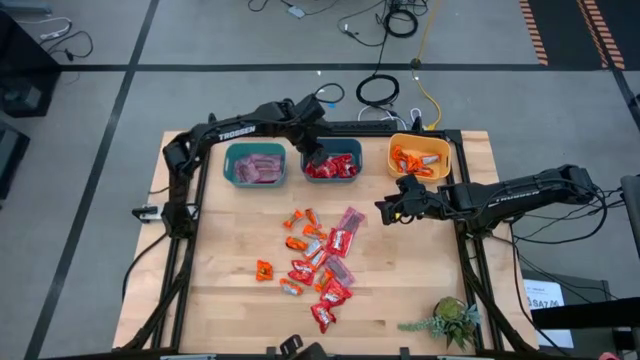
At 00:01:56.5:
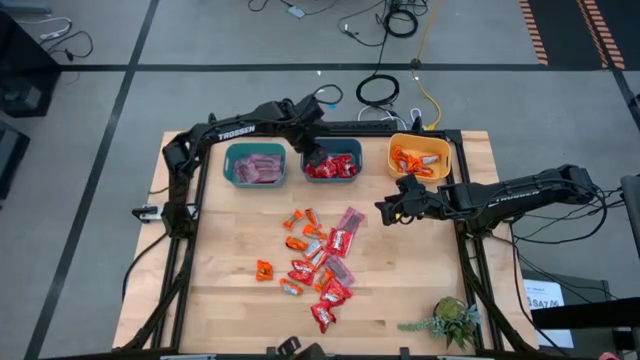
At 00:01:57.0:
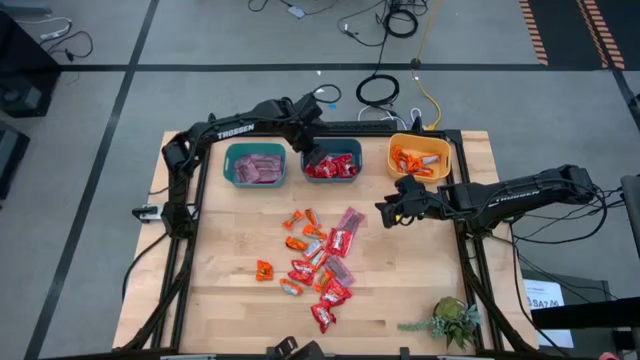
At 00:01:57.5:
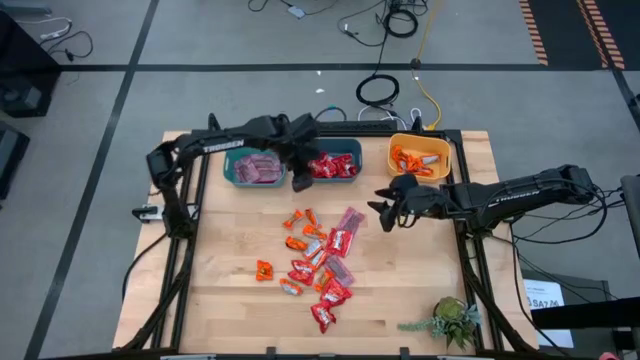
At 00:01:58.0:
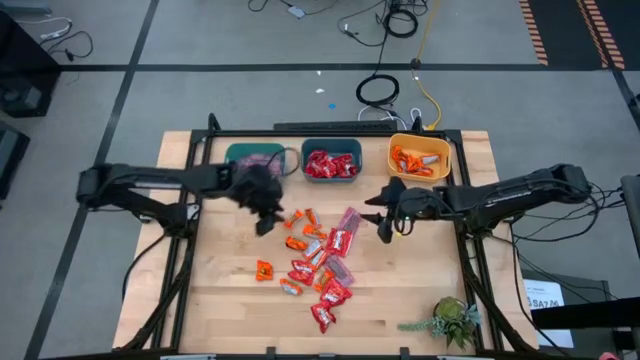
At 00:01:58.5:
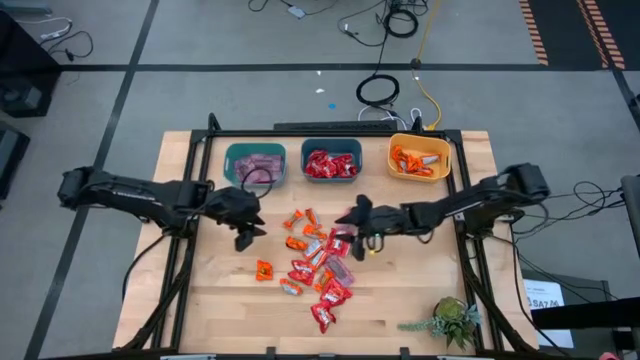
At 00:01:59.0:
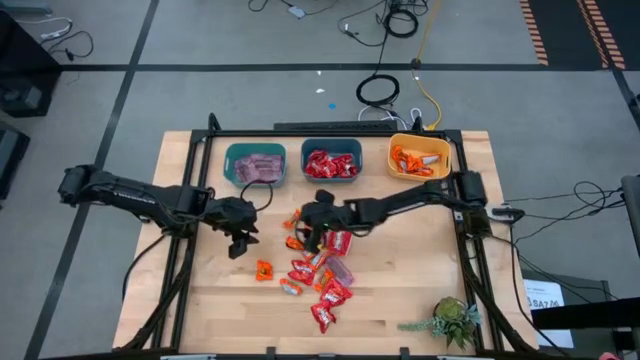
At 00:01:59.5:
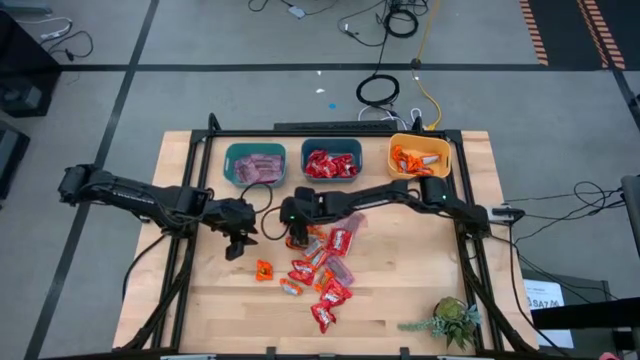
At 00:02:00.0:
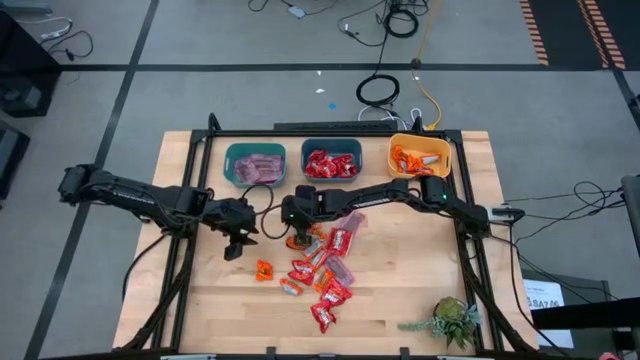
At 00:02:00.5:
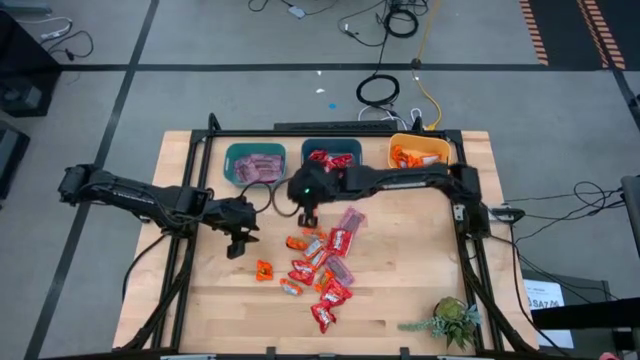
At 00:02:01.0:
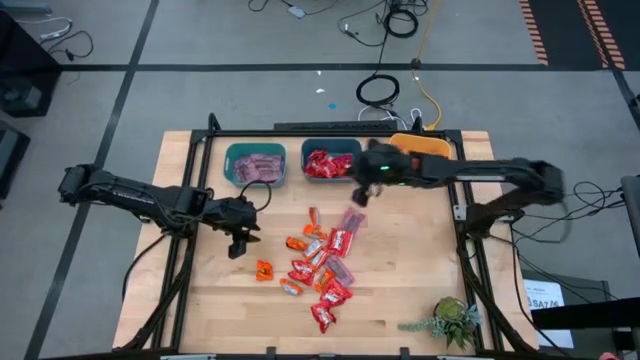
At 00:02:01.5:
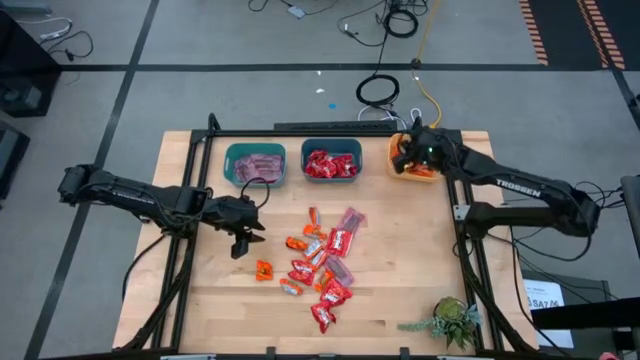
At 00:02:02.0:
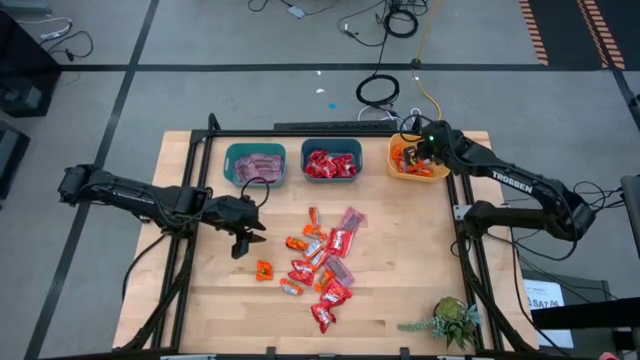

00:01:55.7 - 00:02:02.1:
Task: Sort candy
Put the orange chocolate into the yellow bin

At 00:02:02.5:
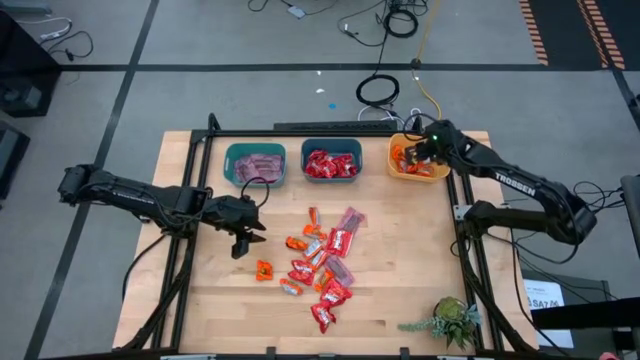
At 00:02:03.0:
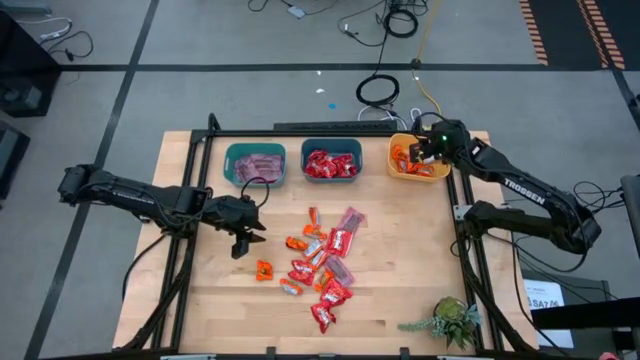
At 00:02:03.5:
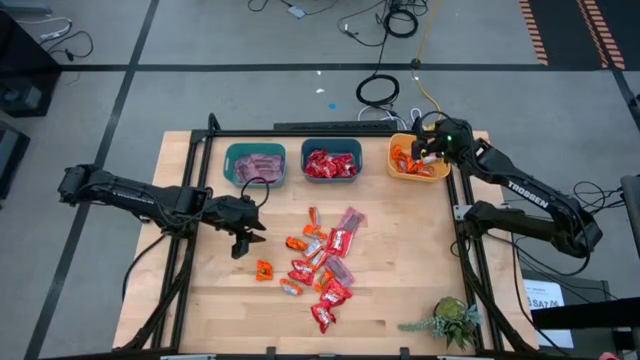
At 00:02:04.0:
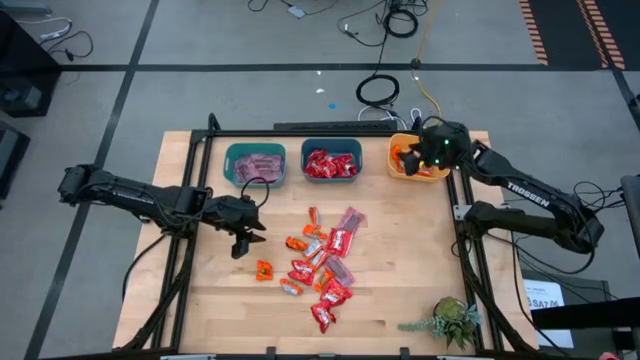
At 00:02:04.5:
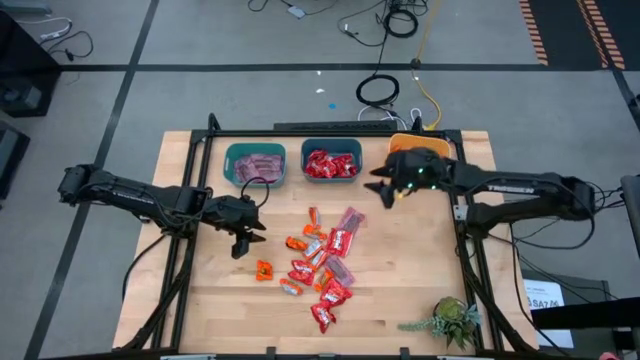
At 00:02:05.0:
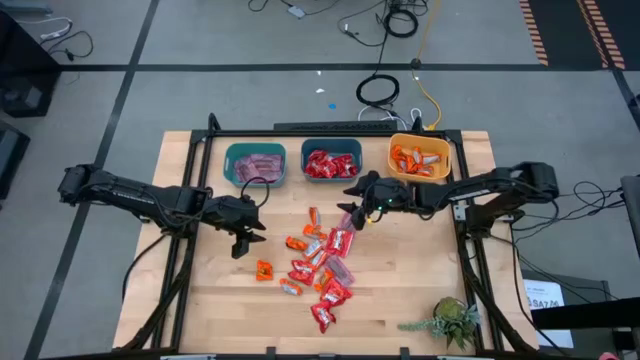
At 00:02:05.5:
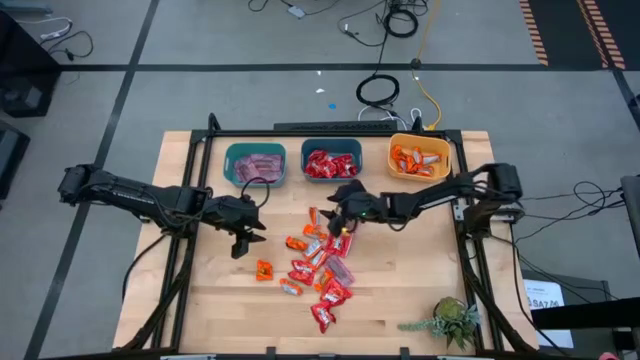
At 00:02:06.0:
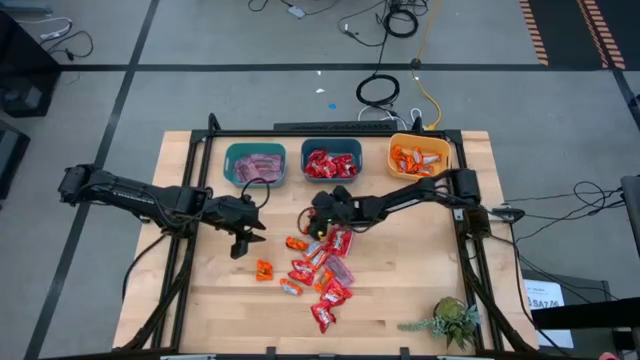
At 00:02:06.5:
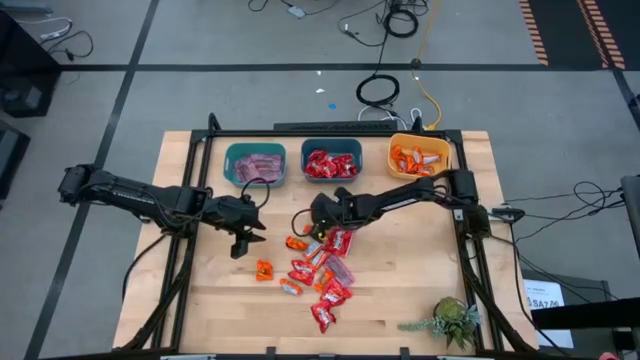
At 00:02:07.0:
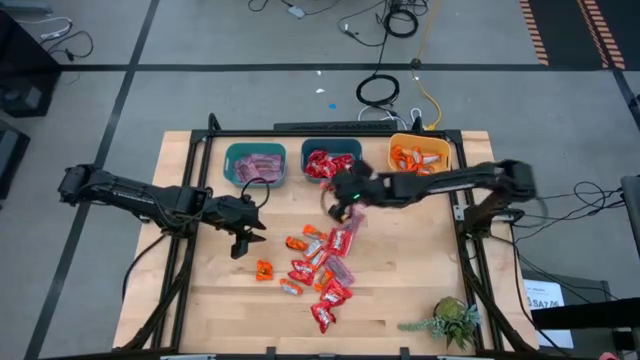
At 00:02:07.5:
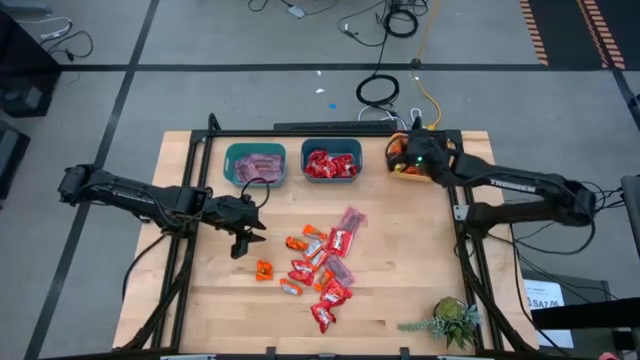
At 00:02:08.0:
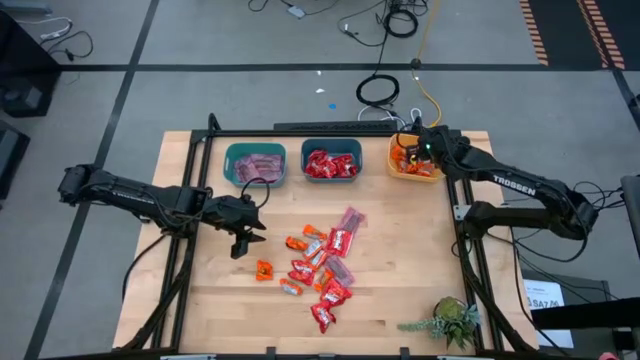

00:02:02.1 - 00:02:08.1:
Put the orange chocolate into the yellow bin

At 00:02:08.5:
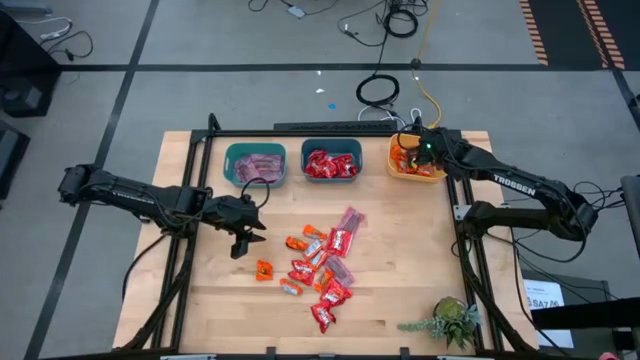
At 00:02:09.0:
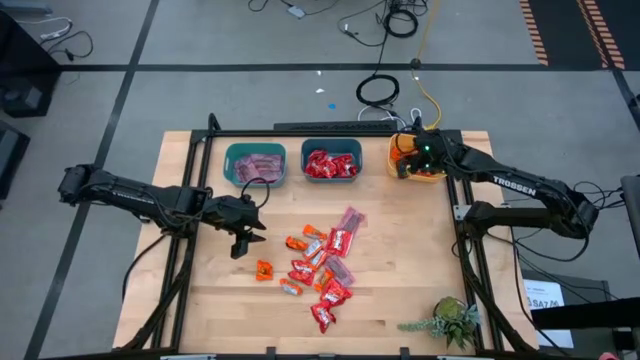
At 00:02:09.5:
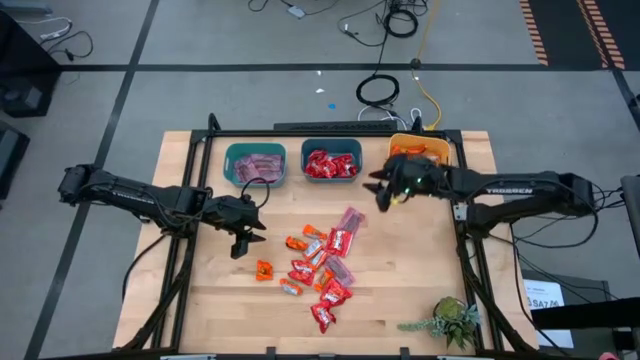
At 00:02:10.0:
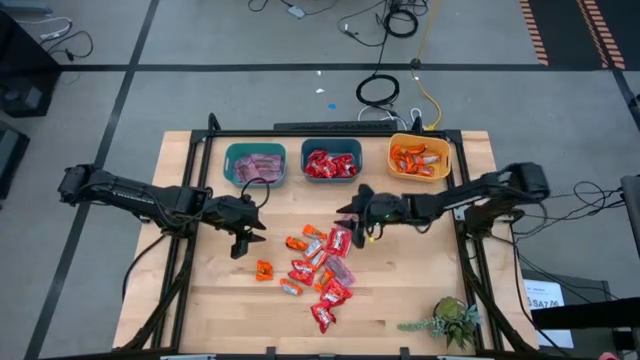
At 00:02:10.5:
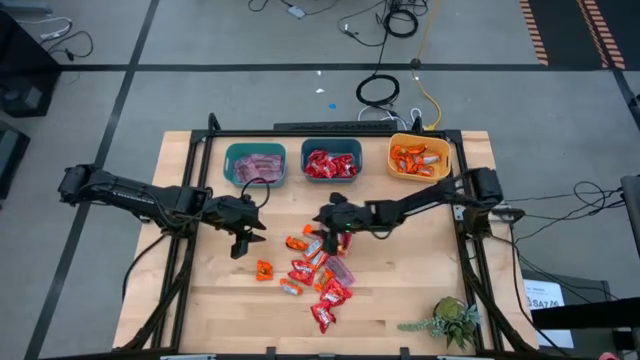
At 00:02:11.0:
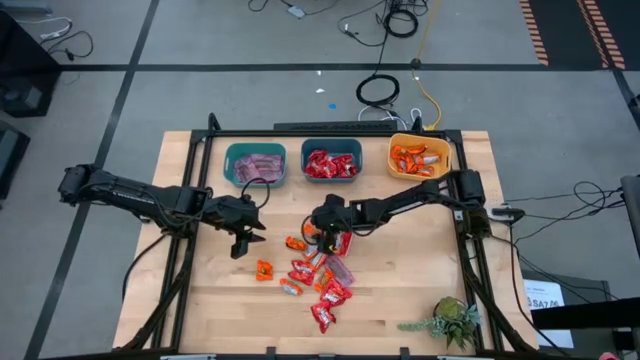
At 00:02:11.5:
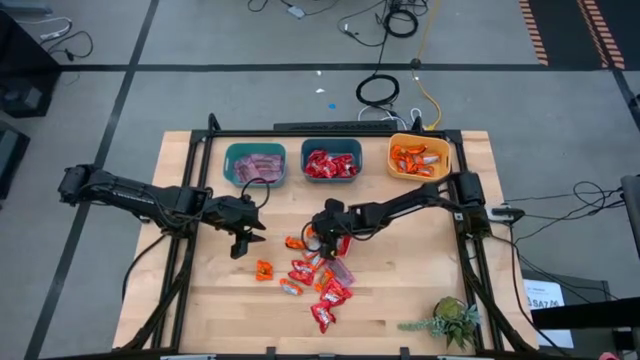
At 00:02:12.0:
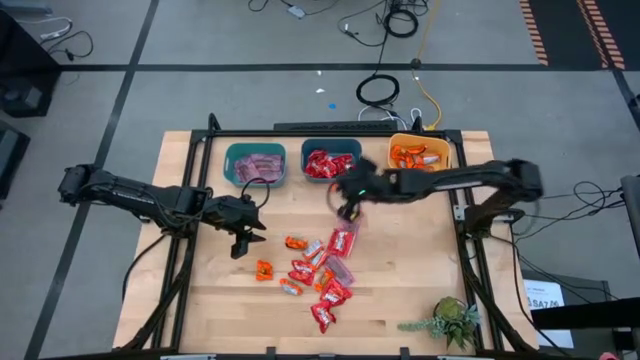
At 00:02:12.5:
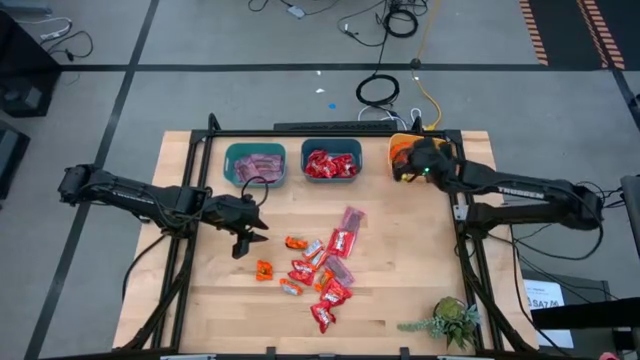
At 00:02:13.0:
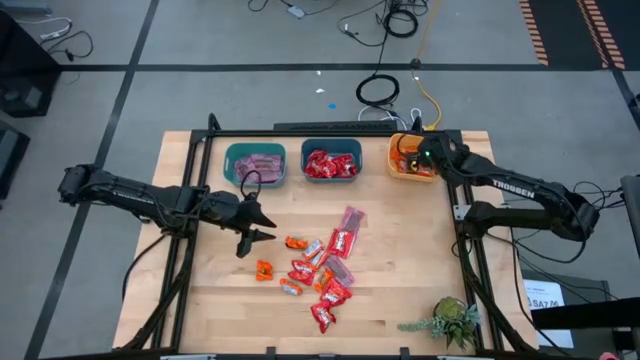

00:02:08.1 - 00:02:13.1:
Put the orange chocolate into the yellow bin

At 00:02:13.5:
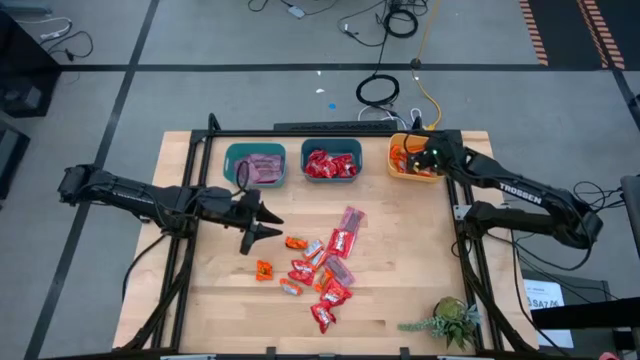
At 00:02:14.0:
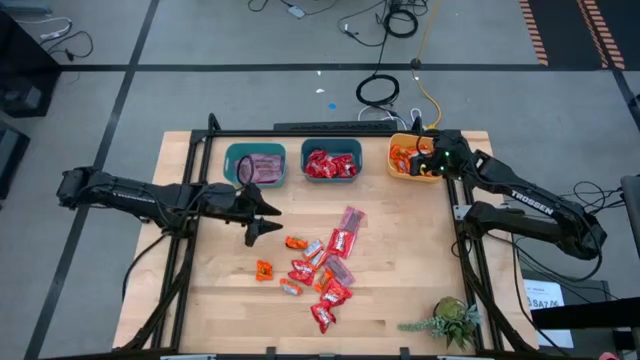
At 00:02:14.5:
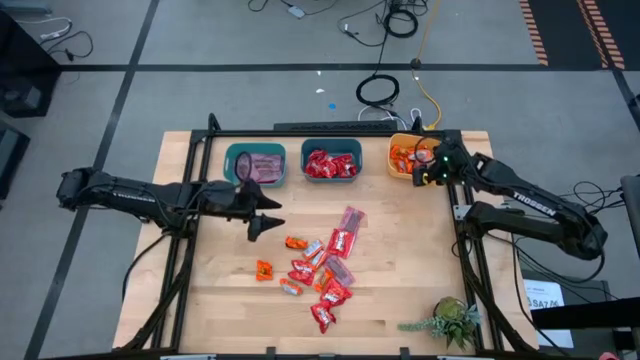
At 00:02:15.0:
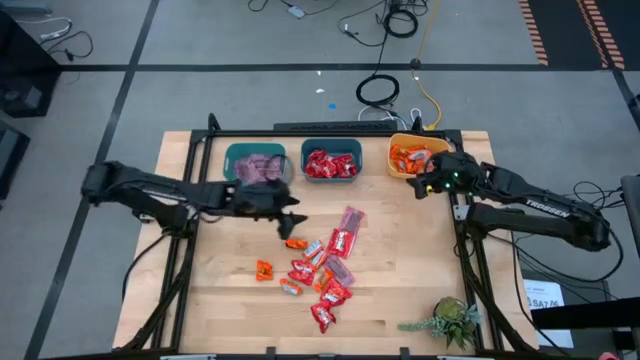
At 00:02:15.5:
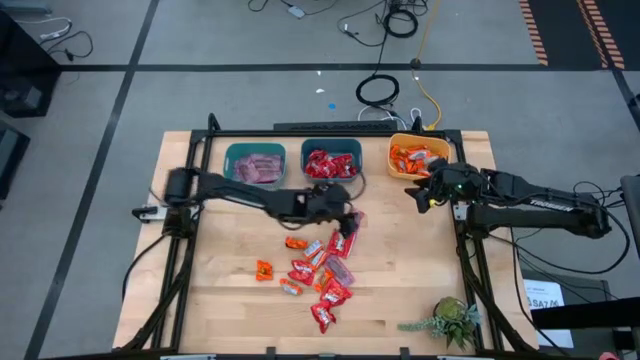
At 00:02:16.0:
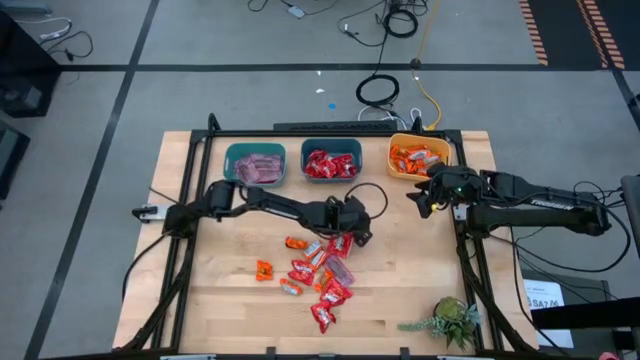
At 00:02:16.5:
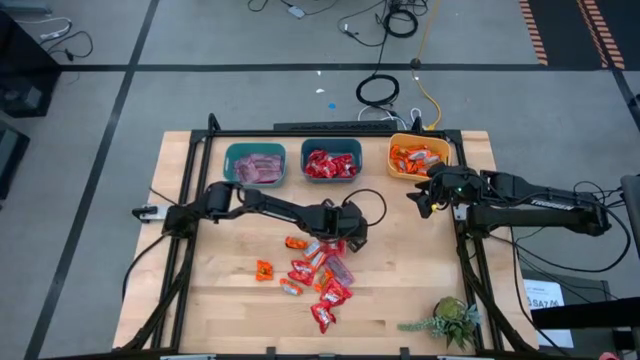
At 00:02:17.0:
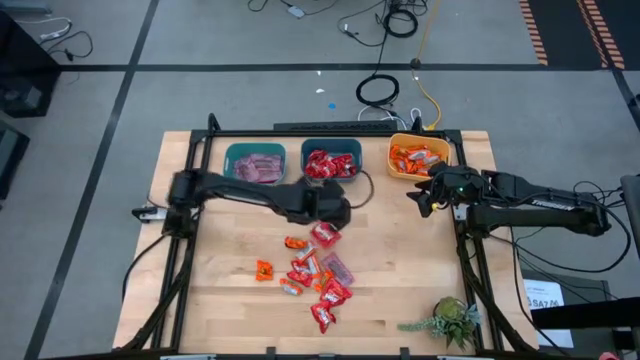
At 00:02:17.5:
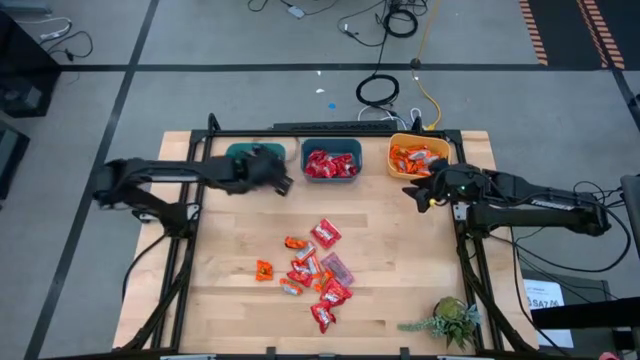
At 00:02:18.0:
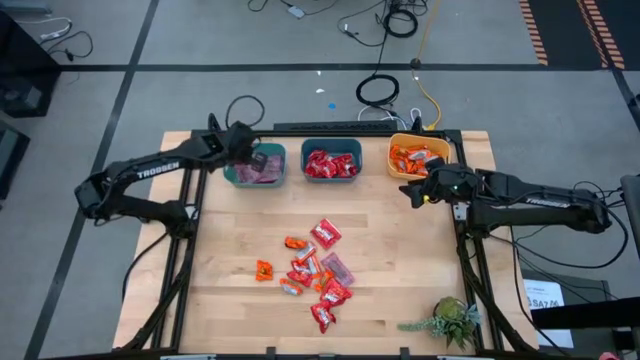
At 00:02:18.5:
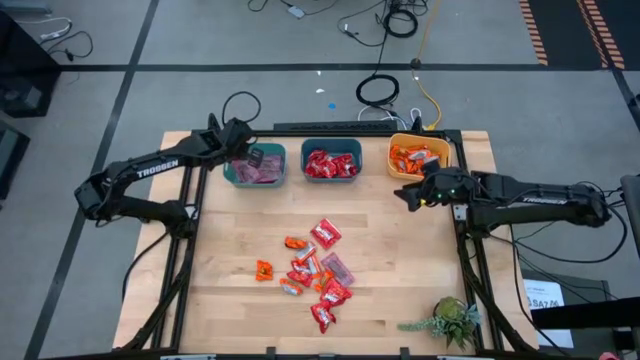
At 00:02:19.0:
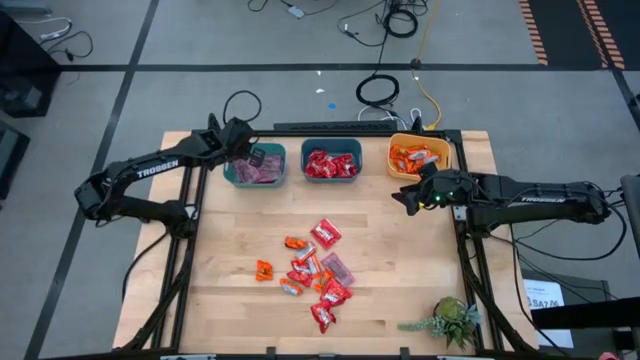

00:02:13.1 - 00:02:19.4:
Put the red chocolate into the green bin
